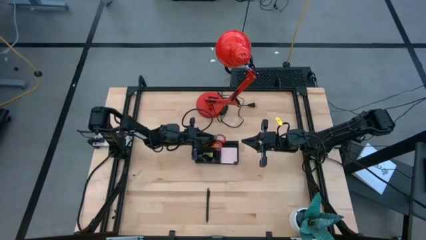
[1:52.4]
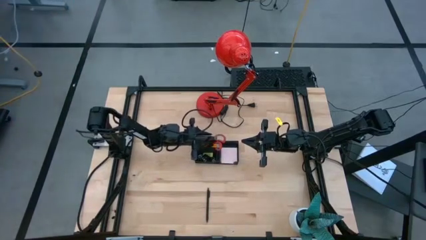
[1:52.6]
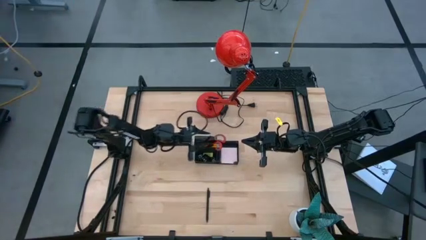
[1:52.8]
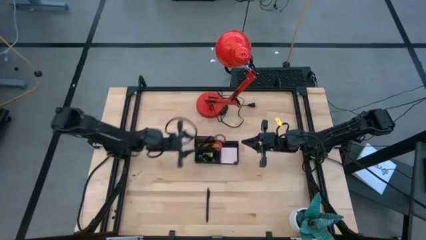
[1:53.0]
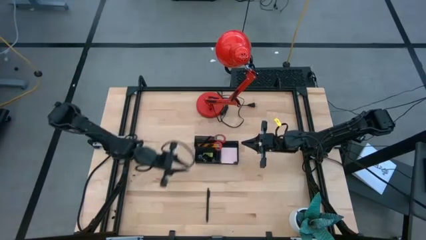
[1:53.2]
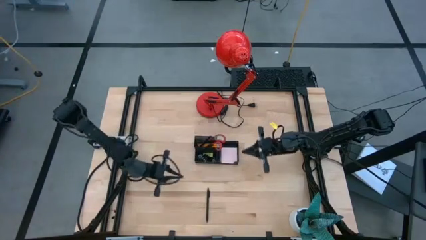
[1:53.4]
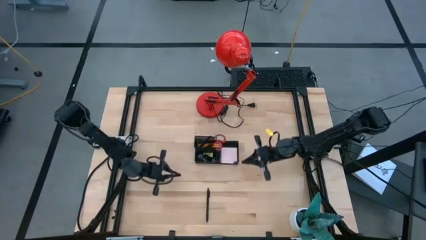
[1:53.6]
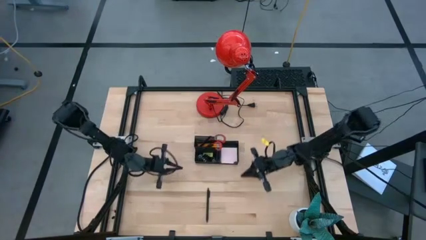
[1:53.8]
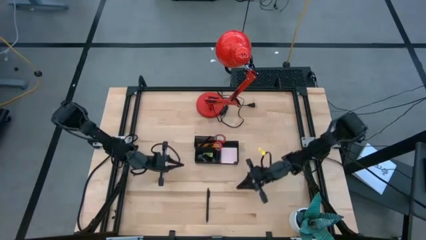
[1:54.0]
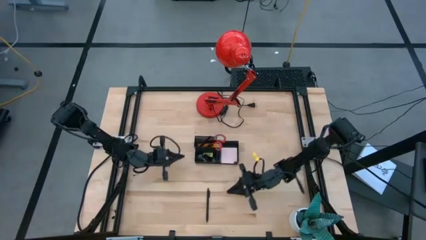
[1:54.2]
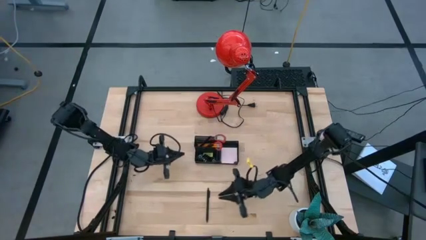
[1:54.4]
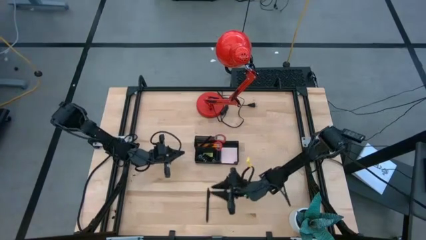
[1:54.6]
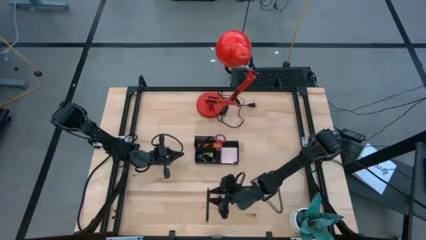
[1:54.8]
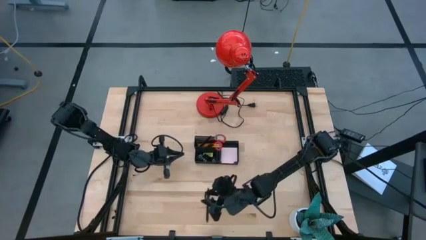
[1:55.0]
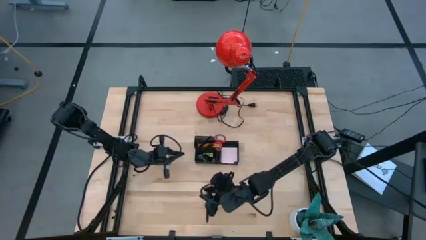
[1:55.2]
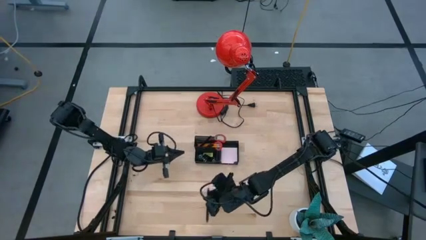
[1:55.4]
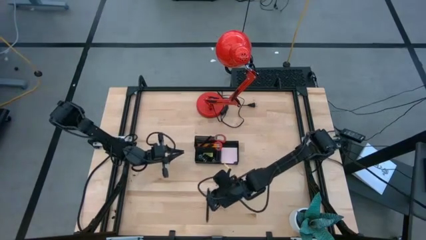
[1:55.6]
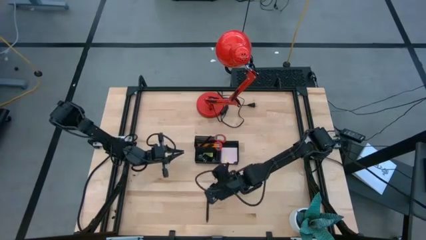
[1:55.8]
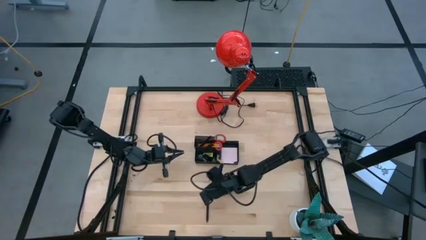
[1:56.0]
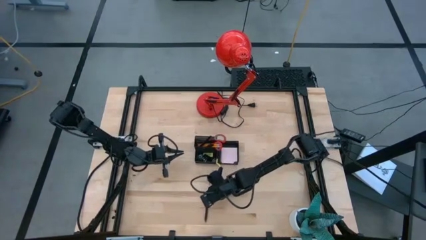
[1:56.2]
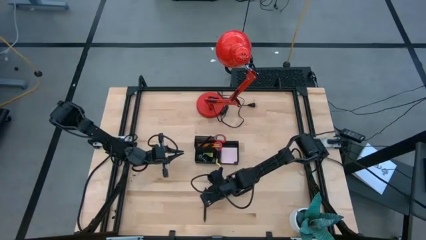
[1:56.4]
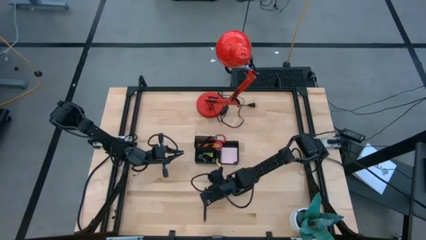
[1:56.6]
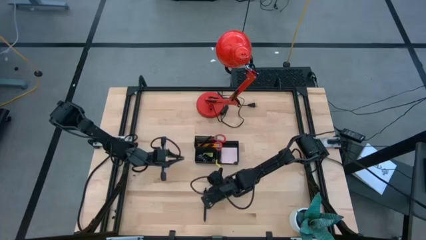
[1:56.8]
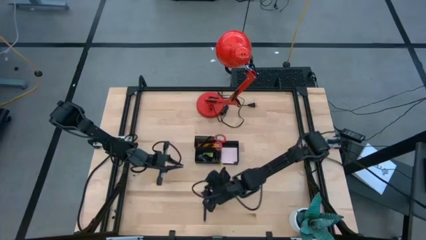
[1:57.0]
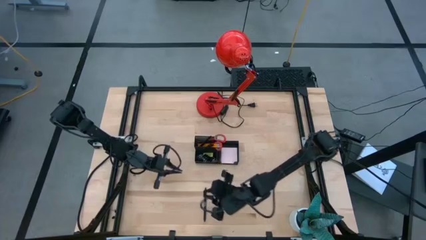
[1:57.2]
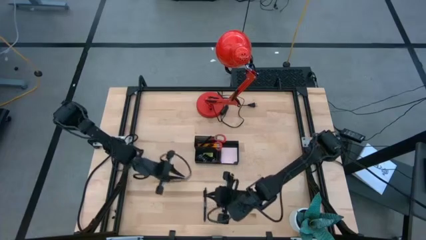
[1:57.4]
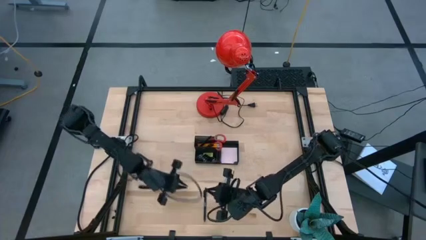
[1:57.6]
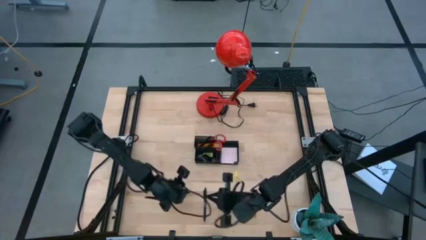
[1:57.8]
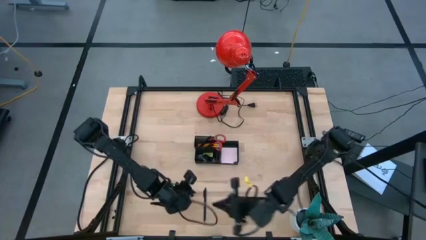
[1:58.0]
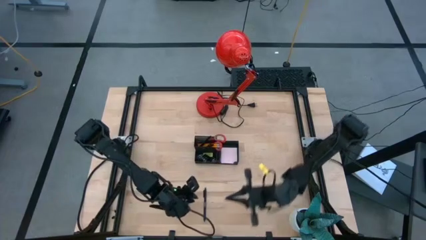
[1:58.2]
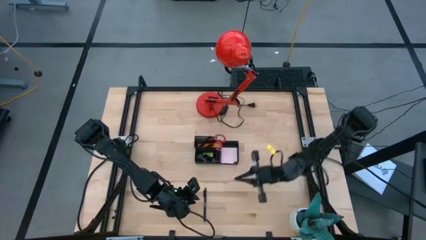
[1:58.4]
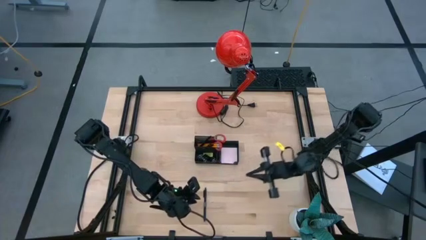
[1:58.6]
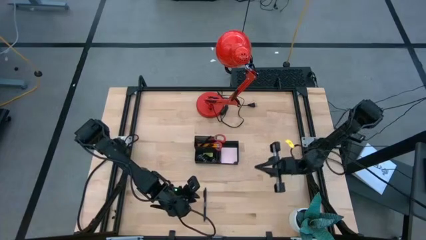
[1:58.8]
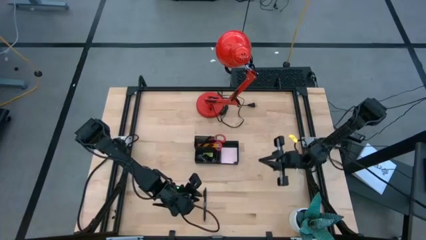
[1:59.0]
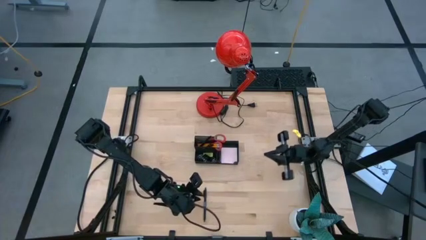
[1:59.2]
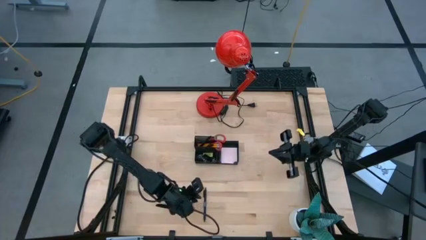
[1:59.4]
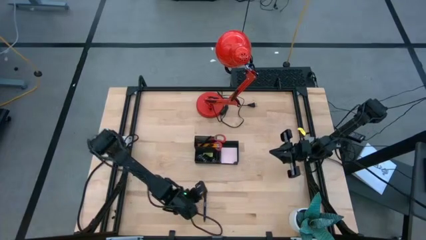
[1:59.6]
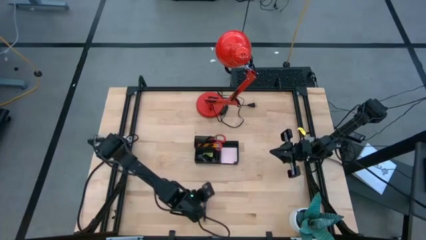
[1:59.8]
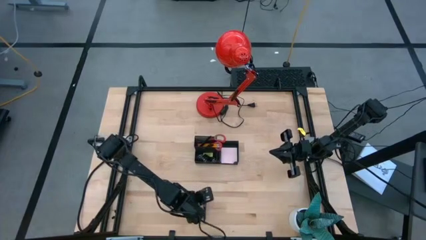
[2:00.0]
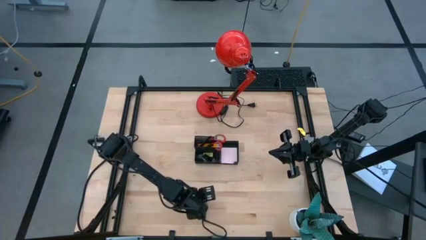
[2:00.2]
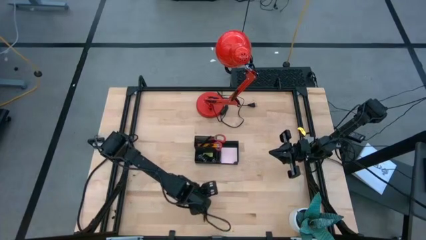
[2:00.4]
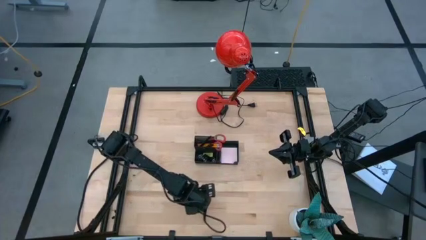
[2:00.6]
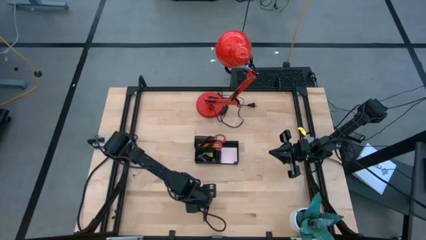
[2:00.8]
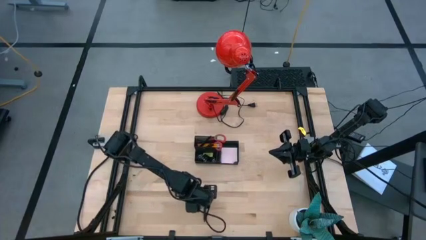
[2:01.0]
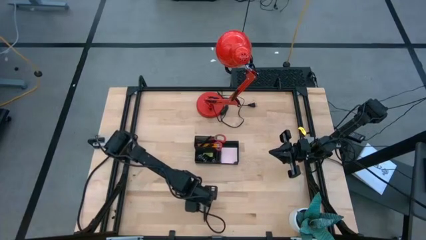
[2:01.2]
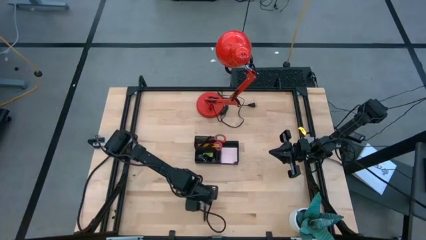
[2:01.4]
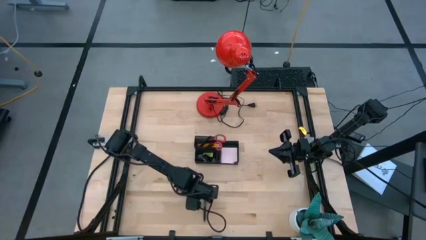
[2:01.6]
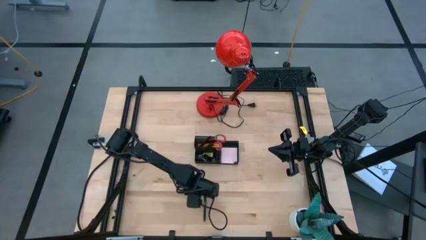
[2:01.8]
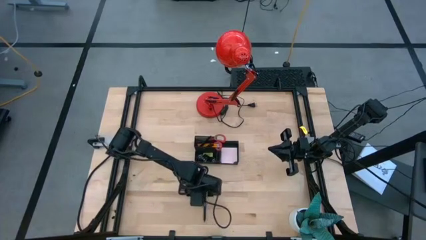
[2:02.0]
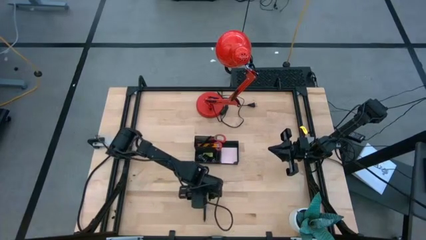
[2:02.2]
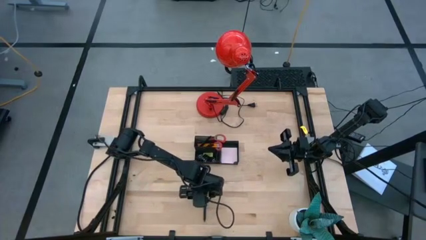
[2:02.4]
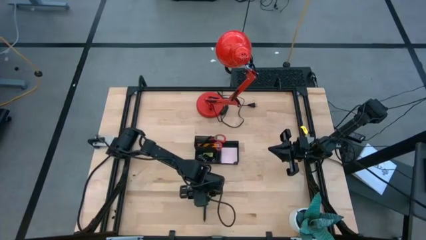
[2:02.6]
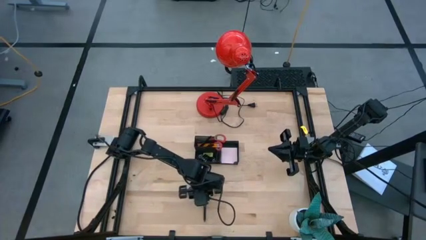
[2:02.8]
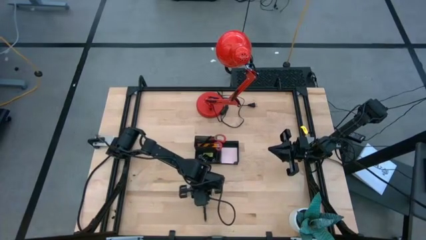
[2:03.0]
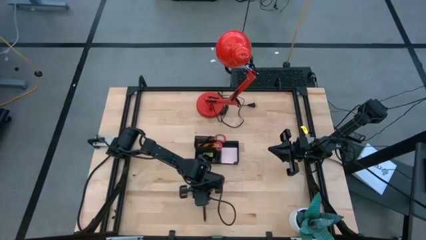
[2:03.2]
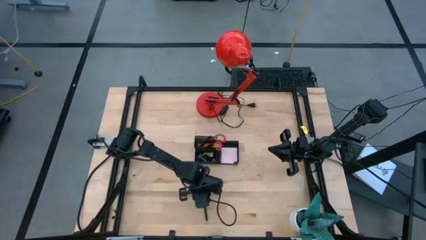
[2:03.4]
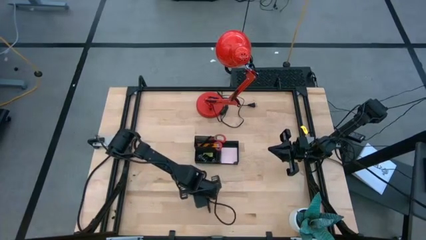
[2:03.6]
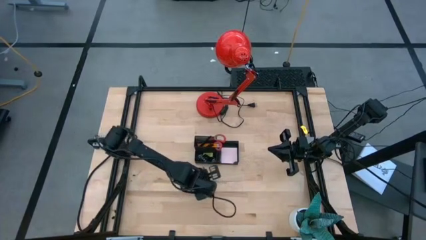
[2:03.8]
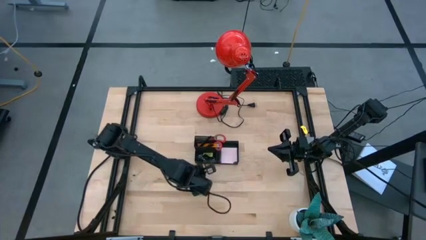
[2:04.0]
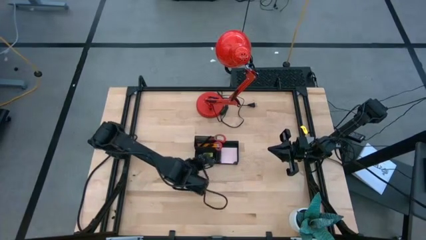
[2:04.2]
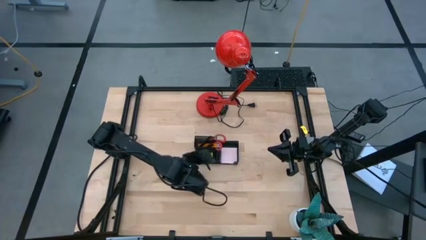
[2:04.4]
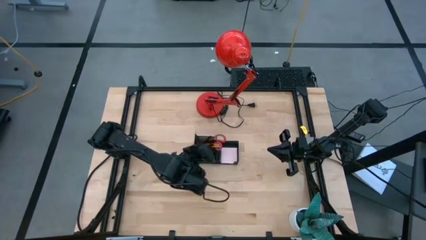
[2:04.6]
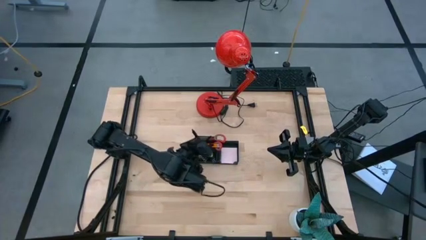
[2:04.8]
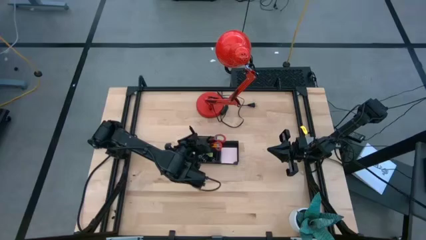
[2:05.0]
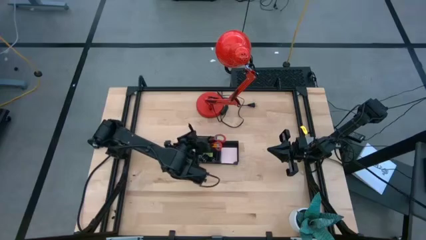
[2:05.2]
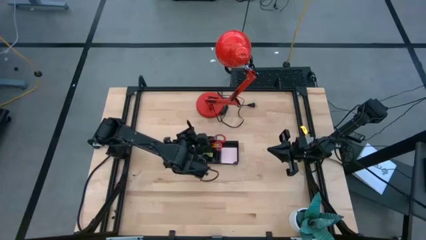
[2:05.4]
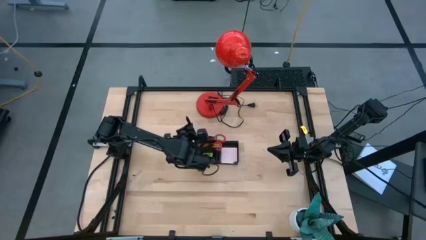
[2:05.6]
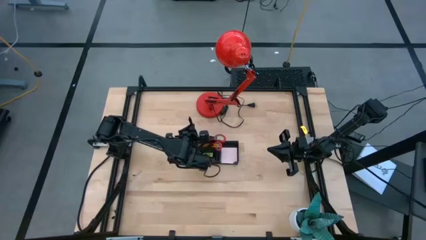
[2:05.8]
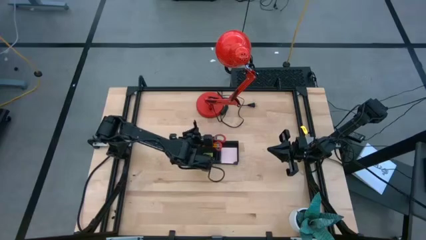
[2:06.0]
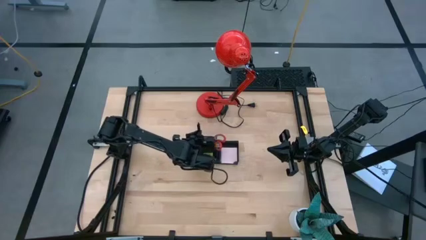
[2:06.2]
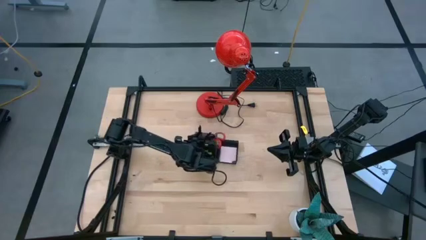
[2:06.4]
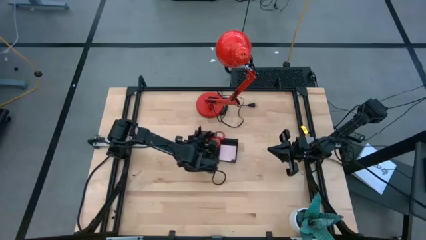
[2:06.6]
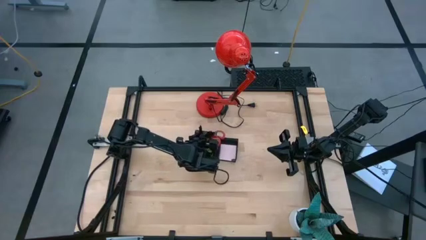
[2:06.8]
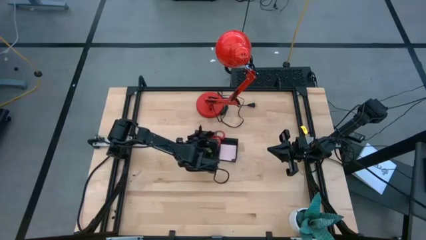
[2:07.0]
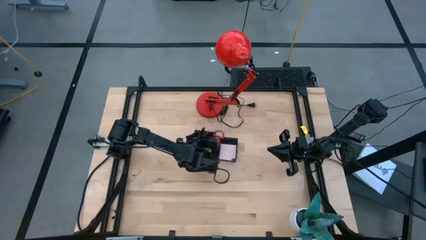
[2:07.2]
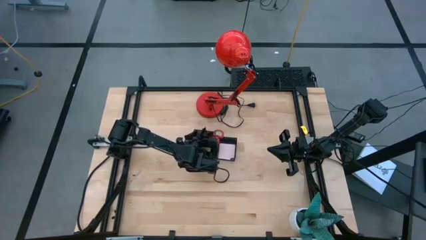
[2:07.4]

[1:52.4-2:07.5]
Task: Pick and place office supplies into organizer
Put the black pen into the black mesh desk organizer

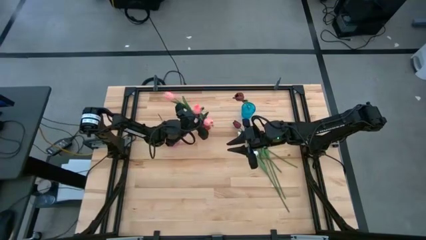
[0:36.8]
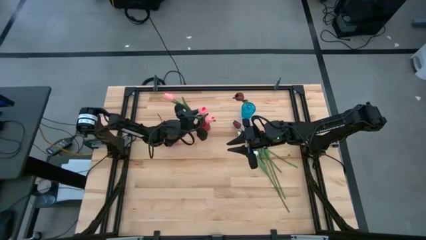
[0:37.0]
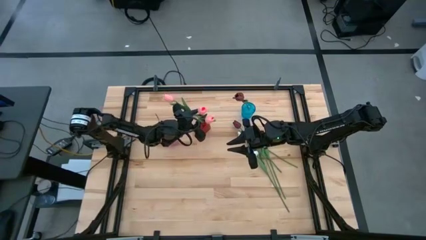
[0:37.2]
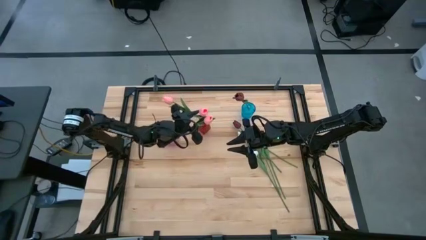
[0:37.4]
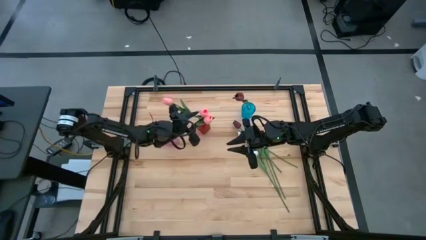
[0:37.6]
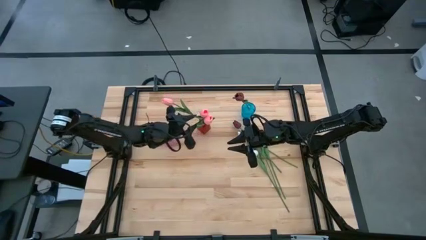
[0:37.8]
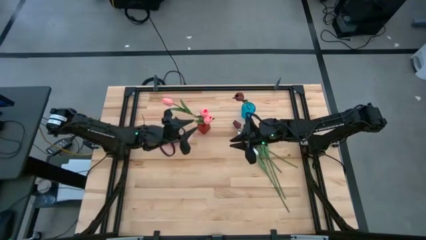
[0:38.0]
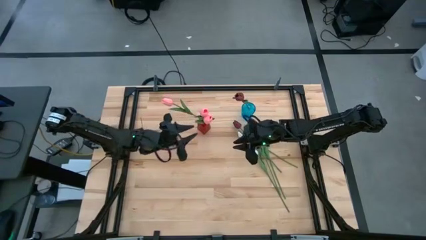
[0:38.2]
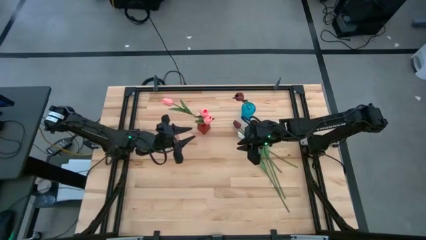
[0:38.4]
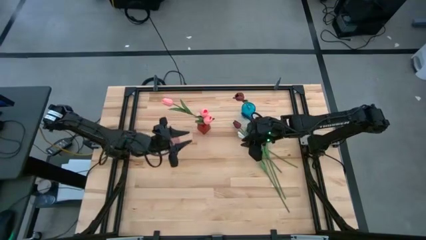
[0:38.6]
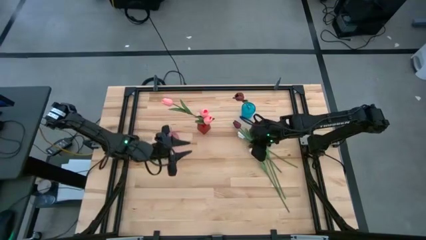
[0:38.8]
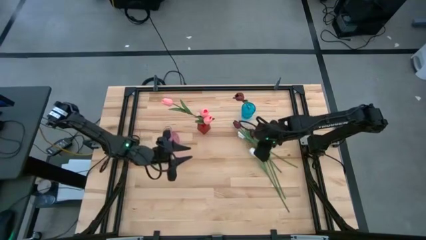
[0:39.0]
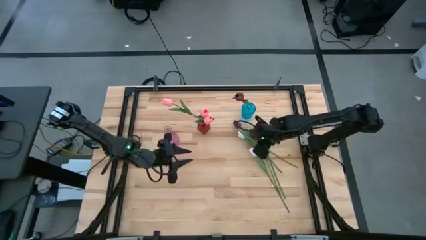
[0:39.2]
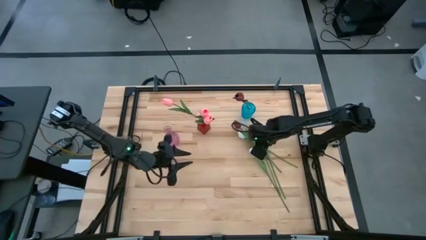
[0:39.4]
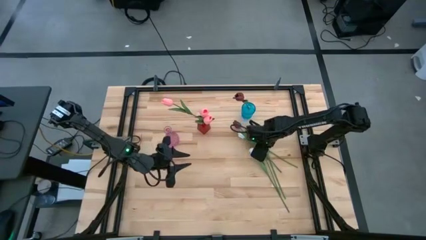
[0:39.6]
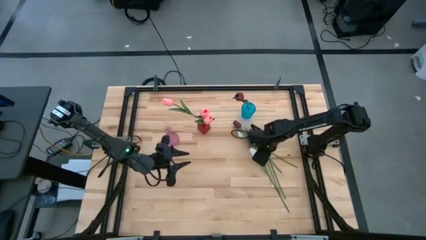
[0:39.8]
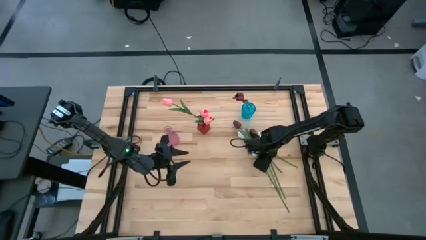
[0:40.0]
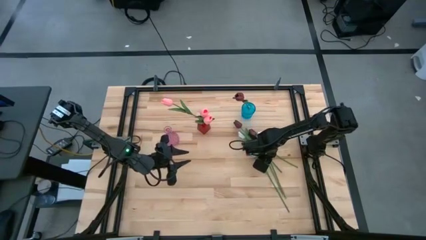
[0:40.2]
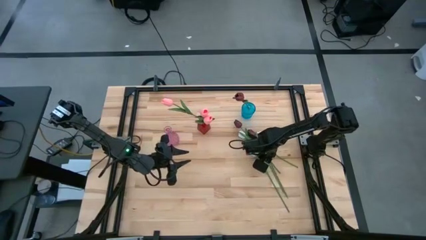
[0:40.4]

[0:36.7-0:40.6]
Task: Sort flowers into vase by color
Put the right red tulip into the blue vase
